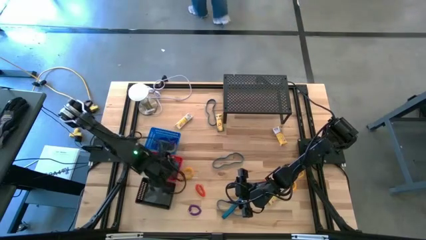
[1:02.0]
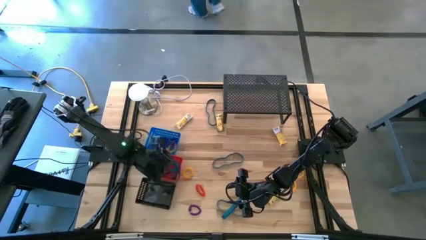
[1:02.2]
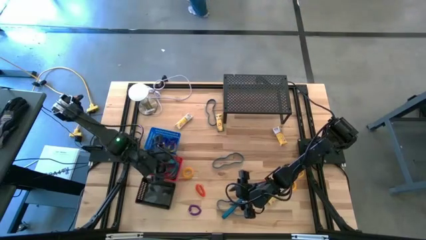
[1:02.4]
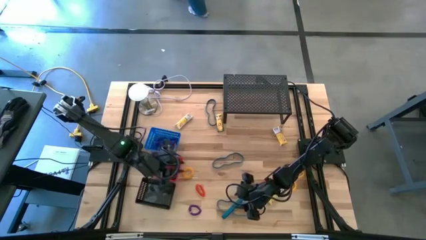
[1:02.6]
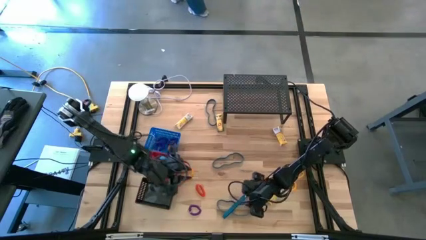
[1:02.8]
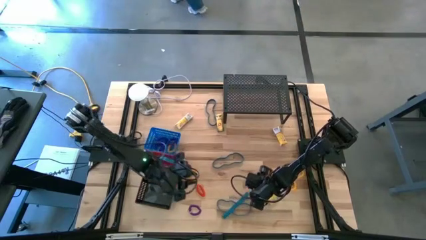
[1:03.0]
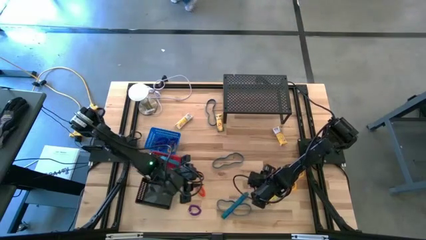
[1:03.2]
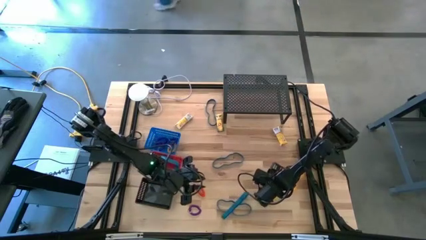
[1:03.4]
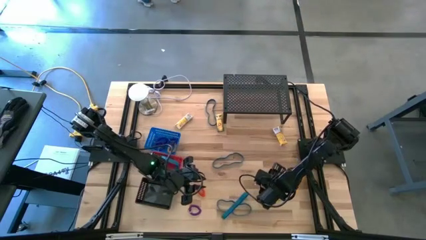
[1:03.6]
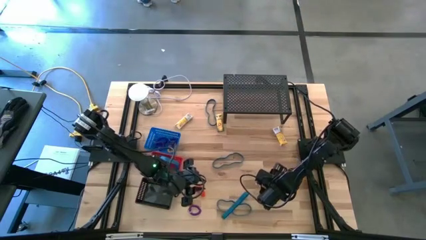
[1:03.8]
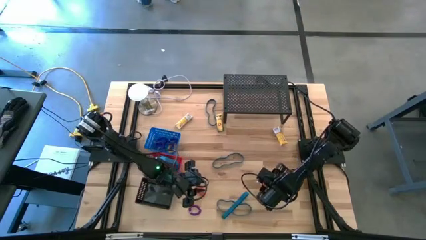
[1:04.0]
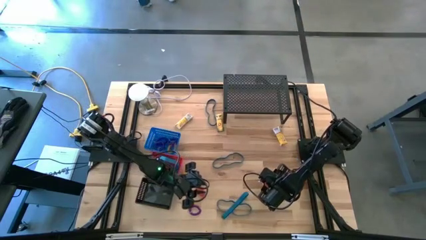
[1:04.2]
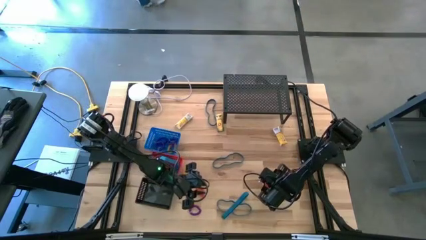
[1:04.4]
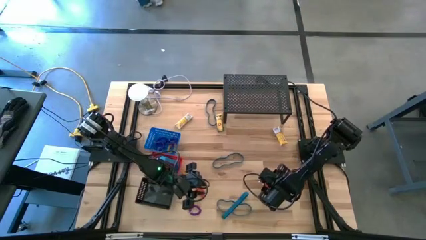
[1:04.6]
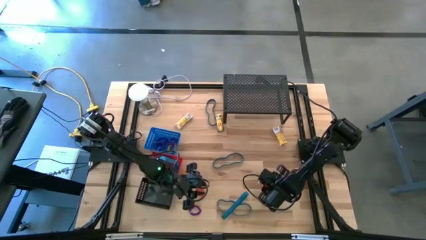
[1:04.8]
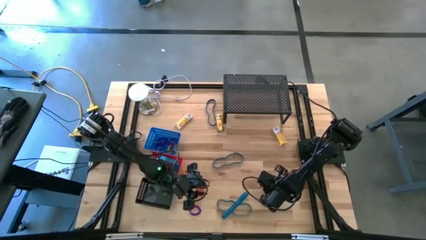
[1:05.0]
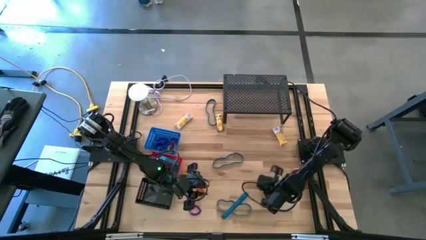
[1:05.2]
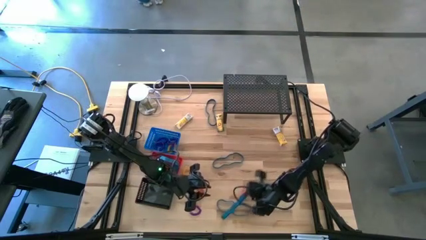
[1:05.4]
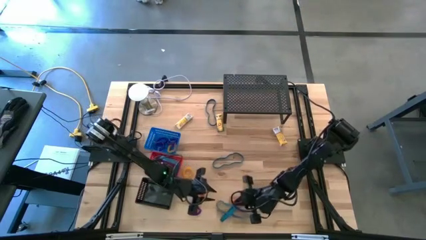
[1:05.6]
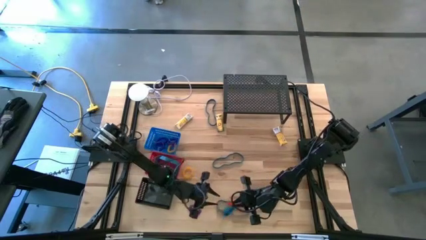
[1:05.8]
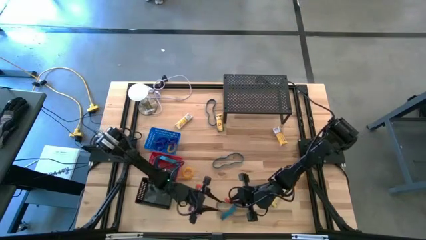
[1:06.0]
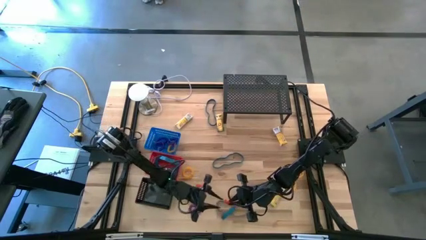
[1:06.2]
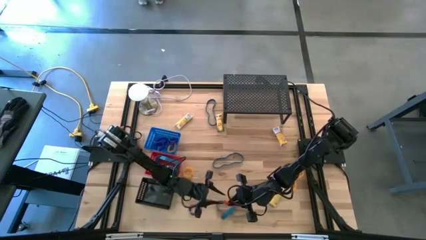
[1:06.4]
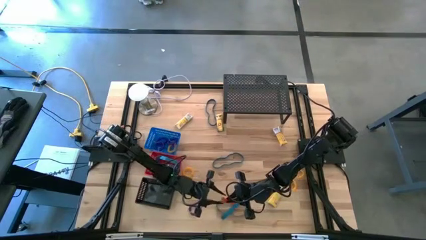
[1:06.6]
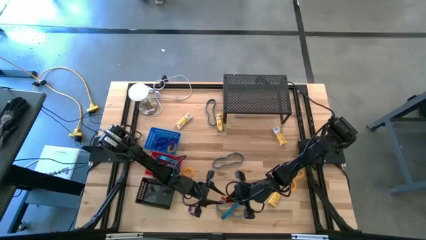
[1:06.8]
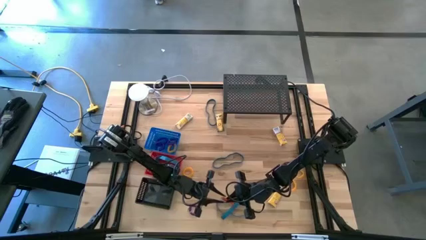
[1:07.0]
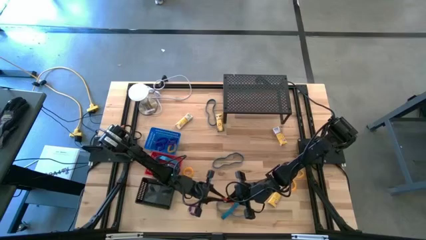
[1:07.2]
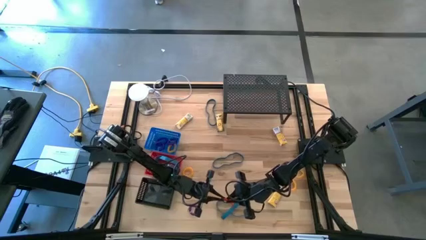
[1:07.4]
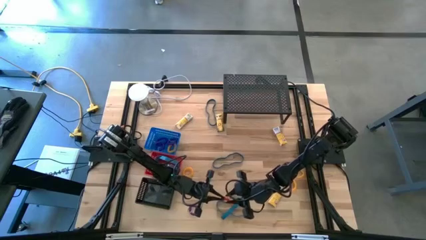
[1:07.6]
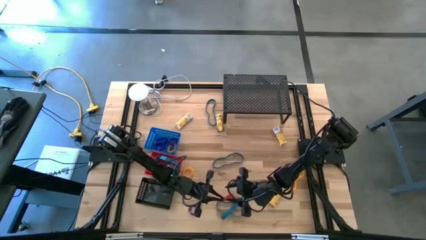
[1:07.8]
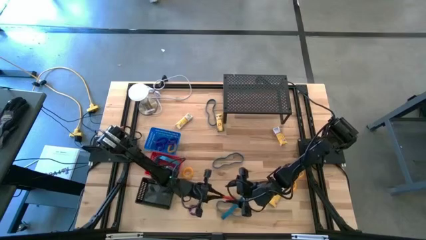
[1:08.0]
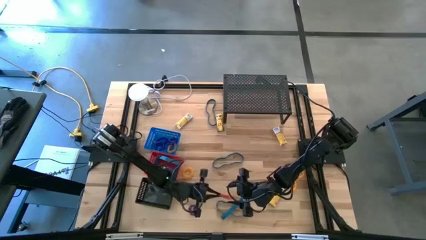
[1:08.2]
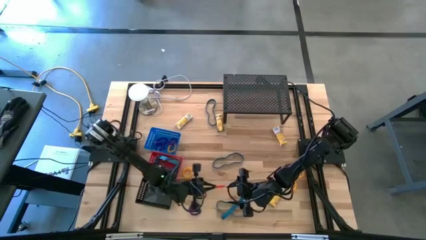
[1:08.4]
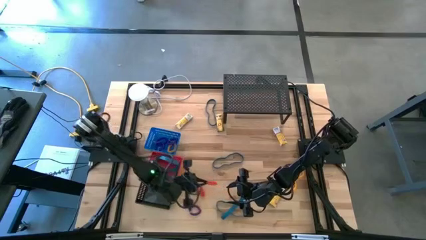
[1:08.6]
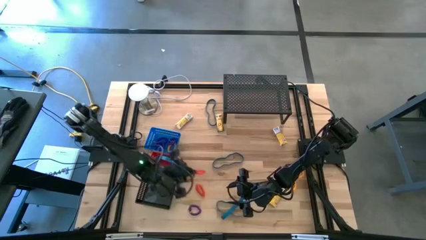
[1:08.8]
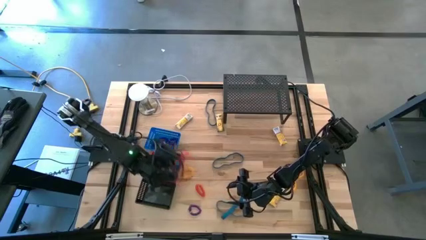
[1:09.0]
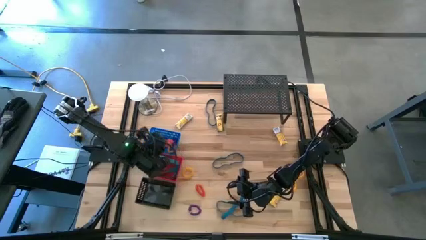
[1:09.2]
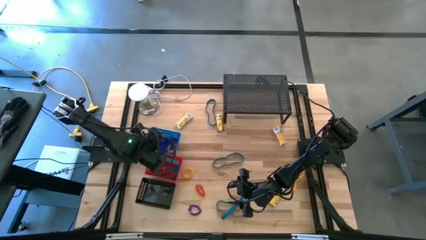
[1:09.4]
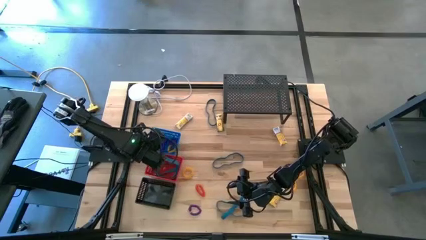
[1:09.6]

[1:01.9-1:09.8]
Task: Pick & Place Office Desk Supplies
Put the orange spring keychain into the blue bin

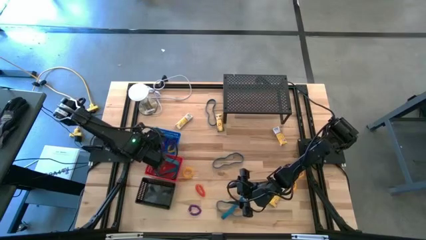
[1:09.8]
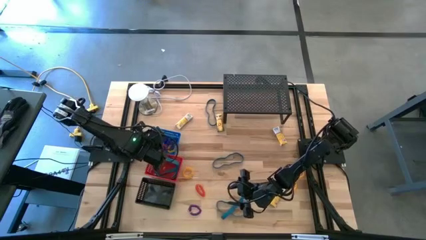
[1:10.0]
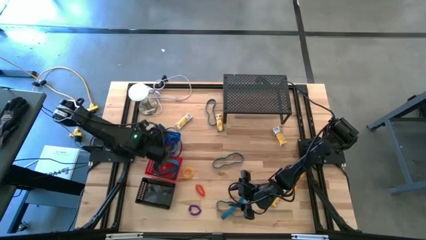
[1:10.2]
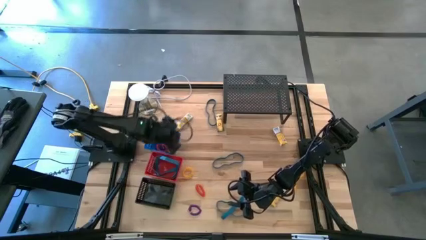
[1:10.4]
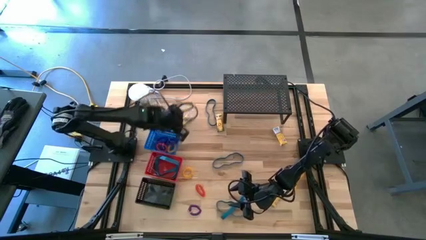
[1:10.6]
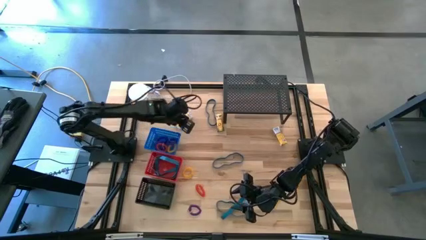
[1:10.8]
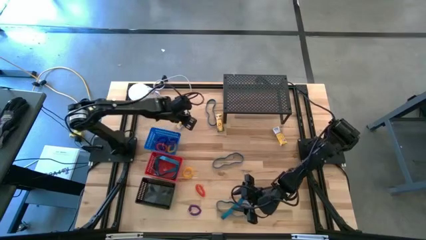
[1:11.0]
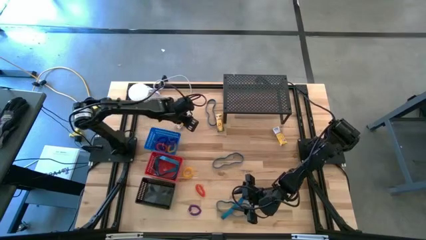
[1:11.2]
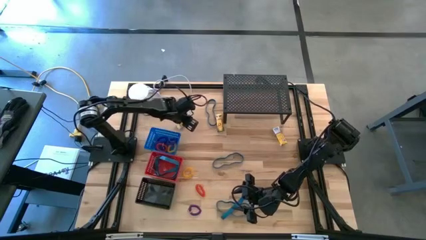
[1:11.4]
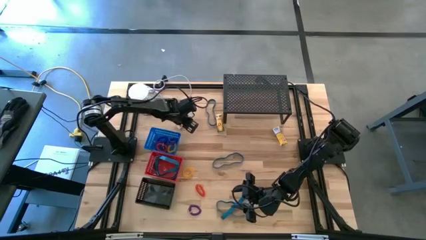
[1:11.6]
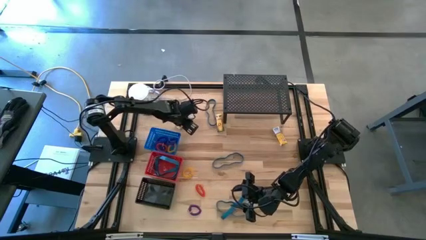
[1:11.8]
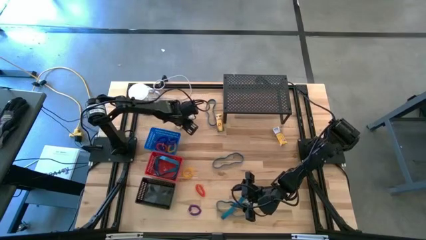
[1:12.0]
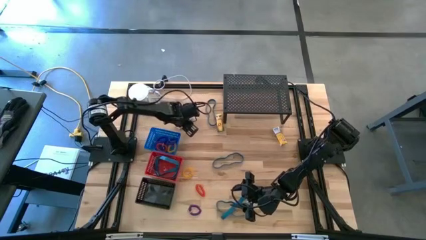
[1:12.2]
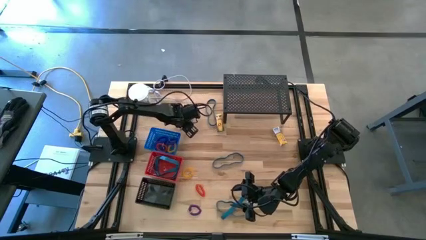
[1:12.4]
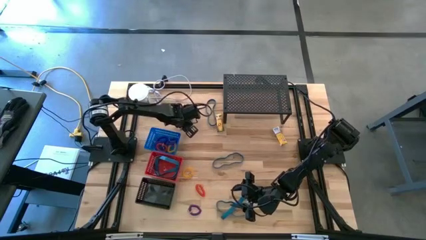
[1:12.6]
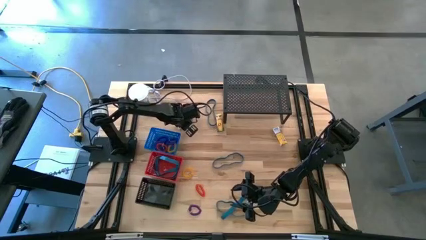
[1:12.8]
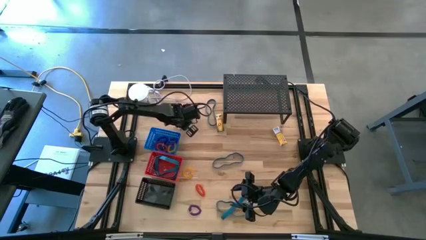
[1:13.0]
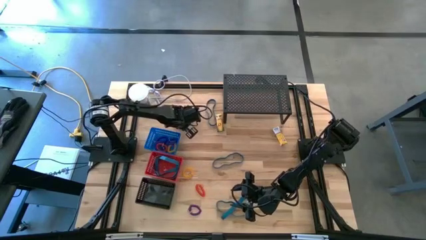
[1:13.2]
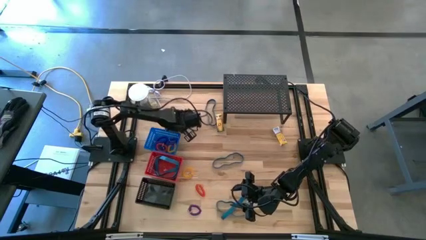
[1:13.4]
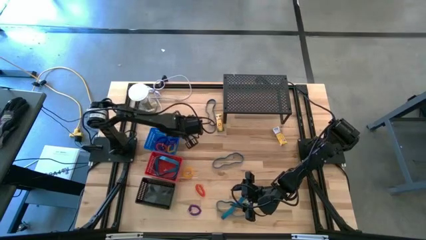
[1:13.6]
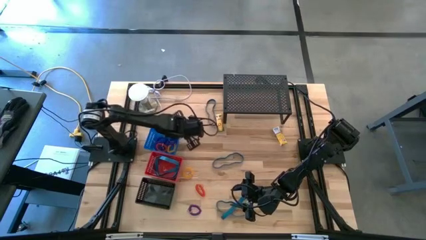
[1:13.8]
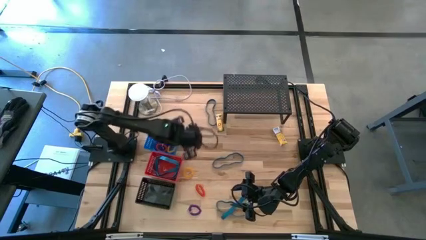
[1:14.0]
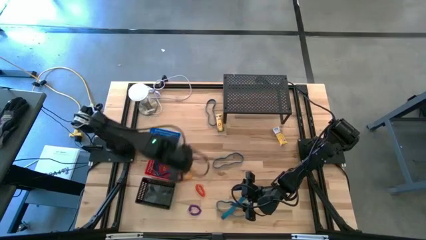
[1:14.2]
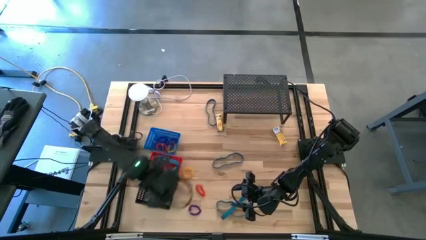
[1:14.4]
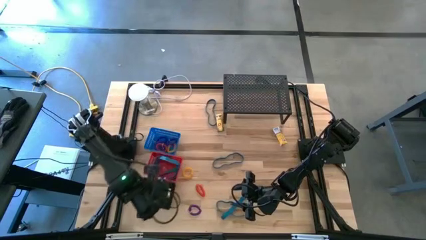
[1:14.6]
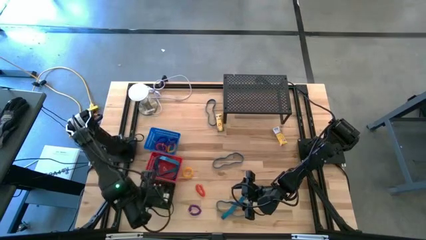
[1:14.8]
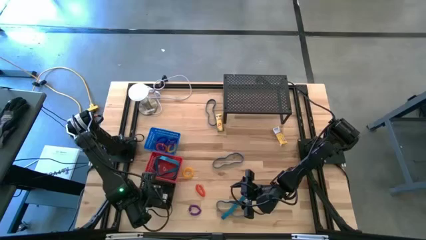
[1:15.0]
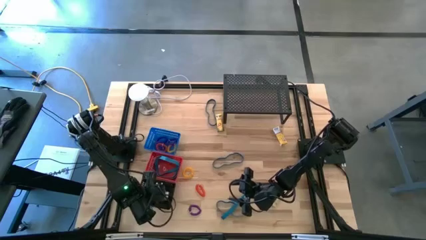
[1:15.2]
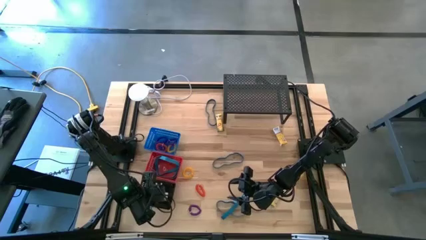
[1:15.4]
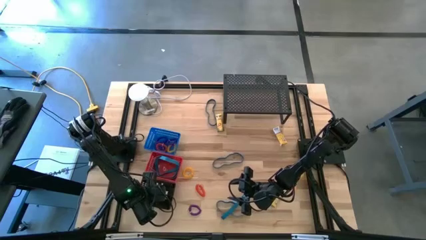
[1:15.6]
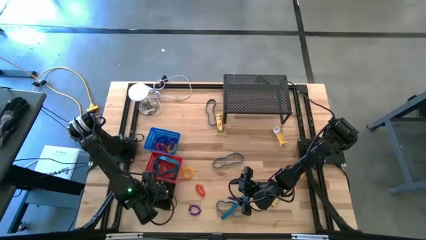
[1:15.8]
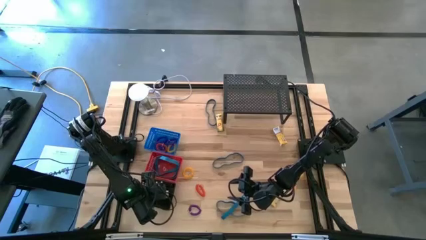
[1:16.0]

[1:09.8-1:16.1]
Put the yellow crayon box into the black bin
